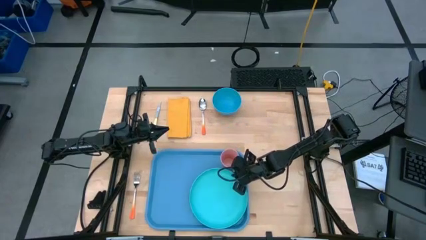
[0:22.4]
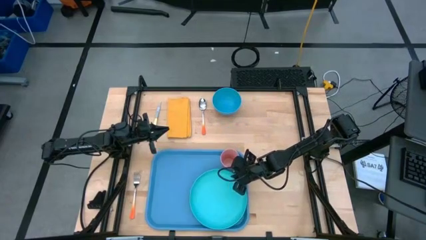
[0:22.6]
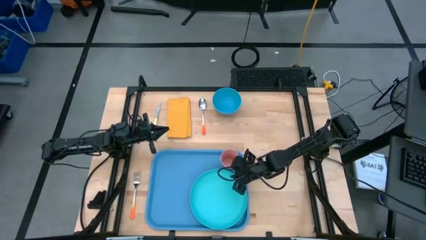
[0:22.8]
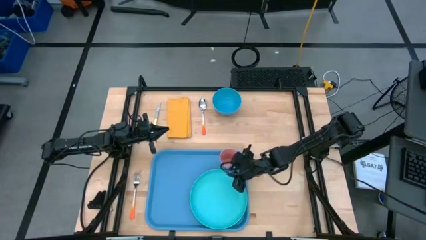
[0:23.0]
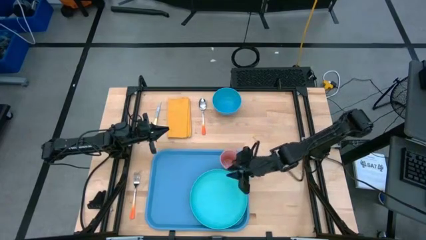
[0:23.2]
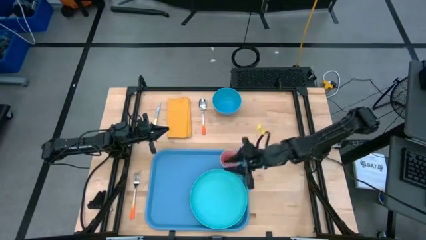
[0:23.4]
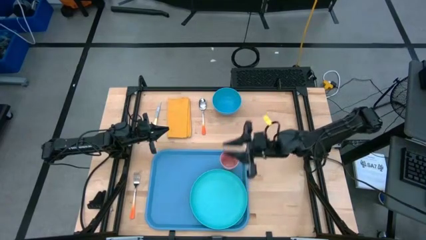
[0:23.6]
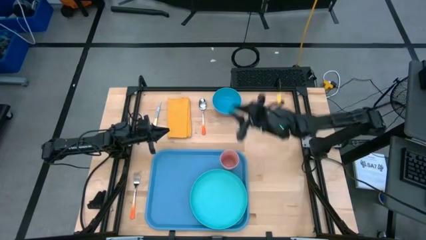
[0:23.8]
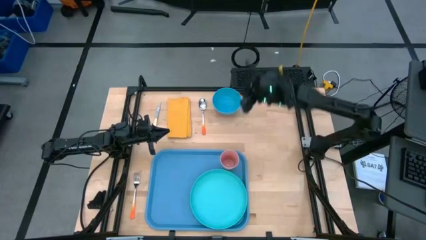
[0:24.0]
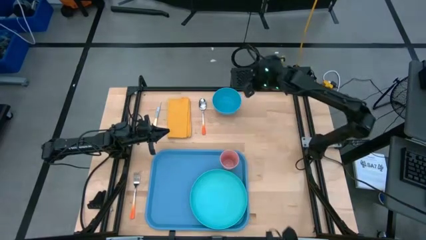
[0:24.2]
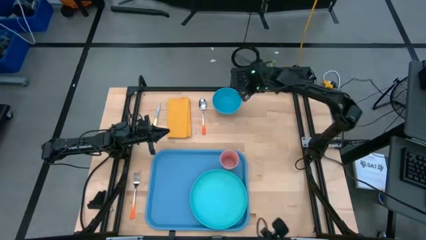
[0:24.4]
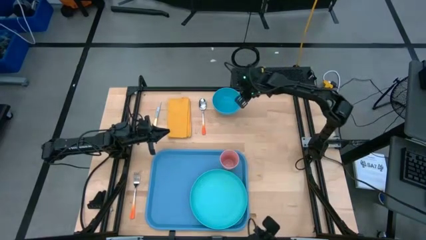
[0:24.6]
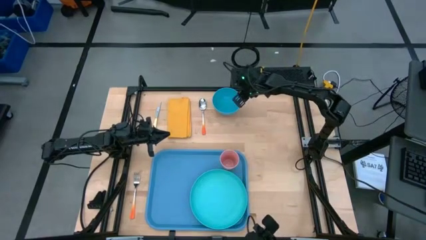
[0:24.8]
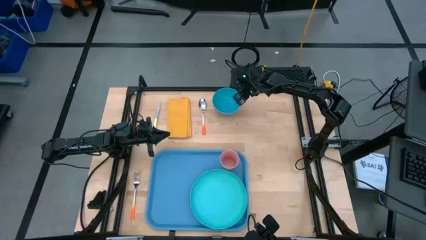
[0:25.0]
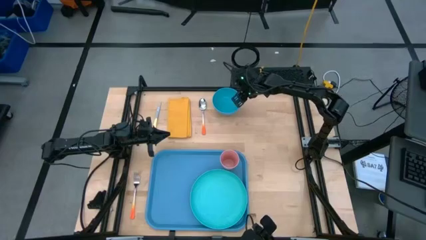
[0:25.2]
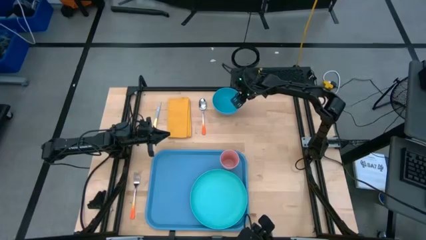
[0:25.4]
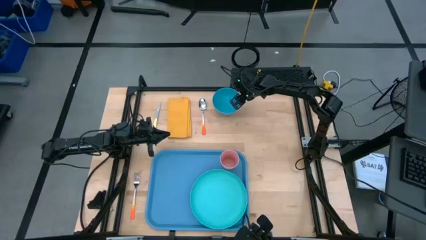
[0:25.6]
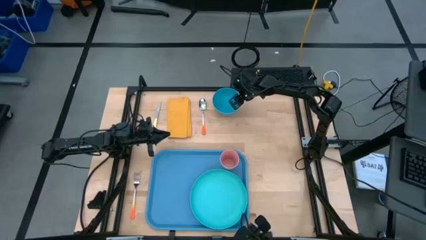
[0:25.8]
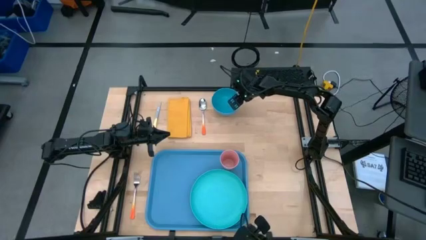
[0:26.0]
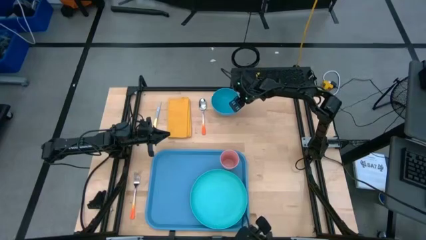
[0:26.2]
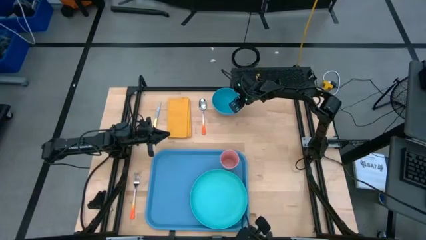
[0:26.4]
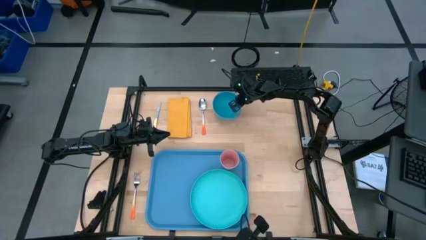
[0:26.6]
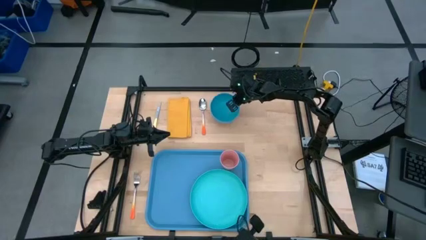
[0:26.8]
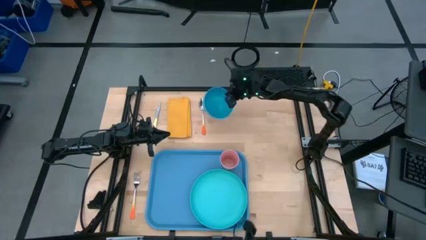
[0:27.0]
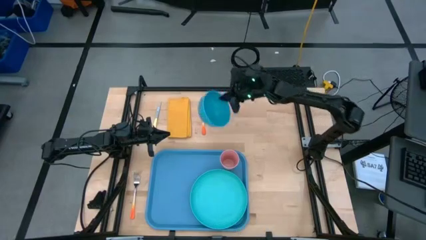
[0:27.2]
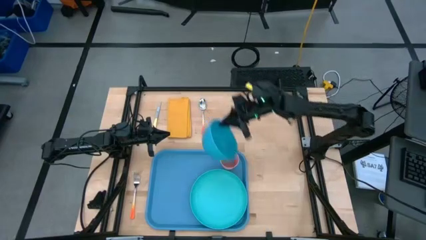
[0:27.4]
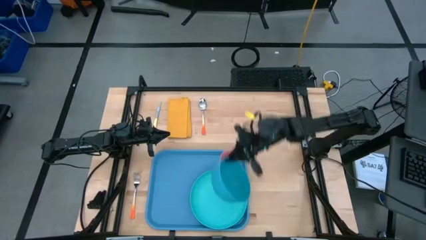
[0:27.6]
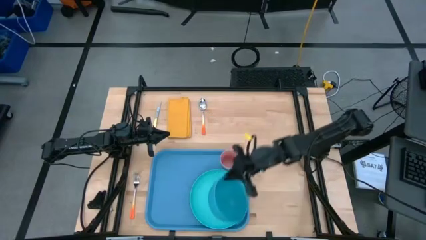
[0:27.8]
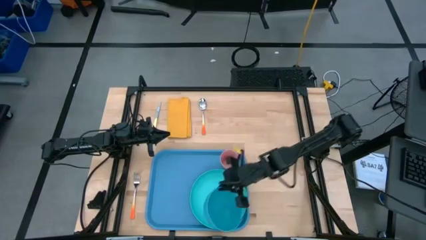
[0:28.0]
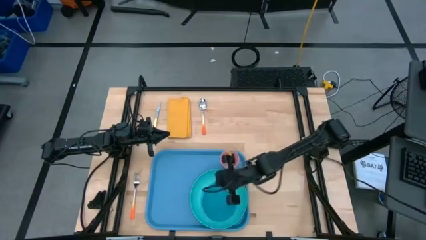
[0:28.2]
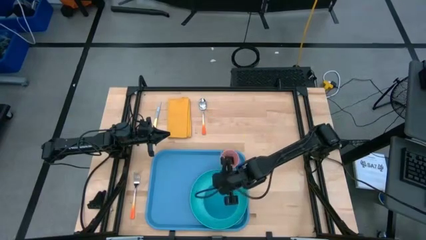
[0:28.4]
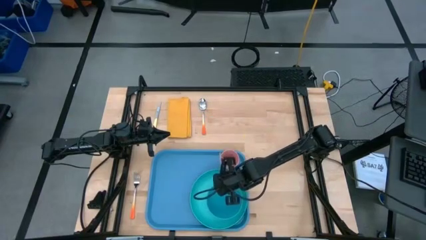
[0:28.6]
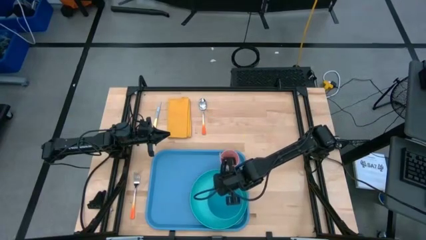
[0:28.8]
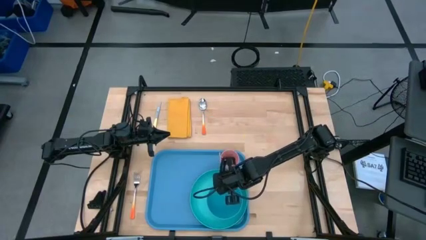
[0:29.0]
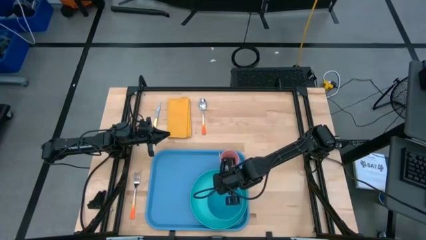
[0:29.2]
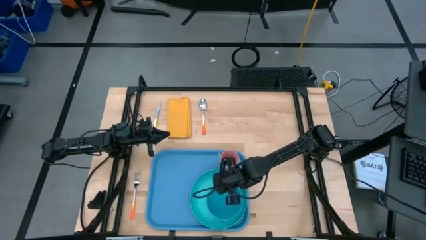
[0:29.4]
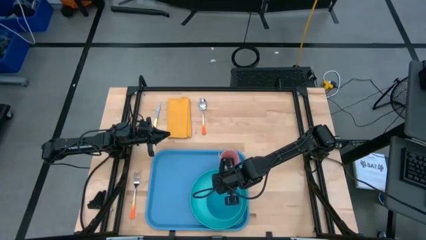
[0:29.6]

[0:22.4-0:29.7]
Task: Set up tray
Put the blue bowl on the blue plate

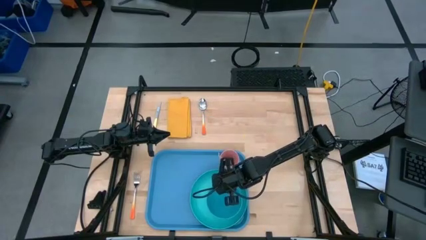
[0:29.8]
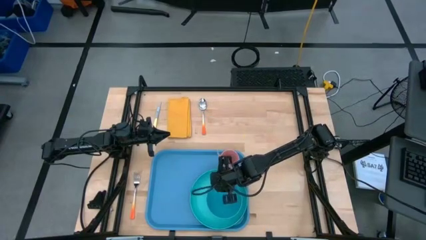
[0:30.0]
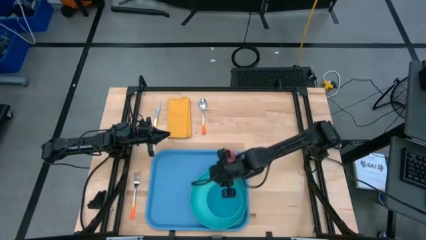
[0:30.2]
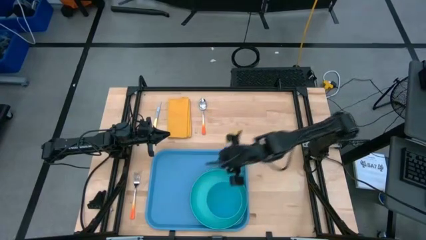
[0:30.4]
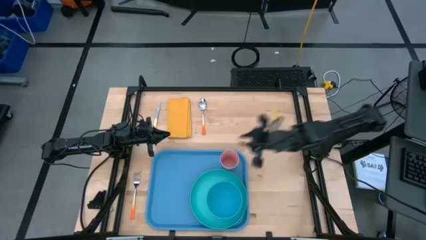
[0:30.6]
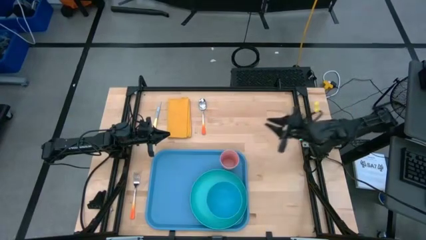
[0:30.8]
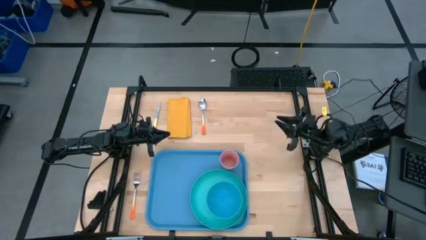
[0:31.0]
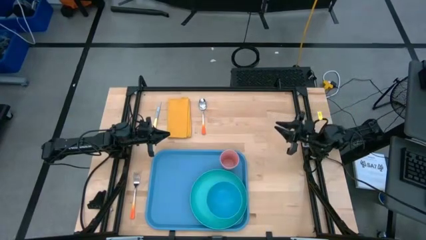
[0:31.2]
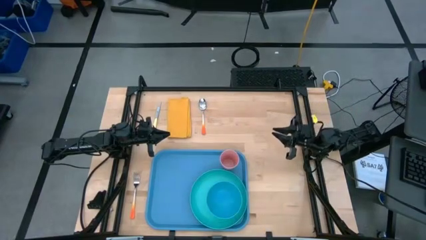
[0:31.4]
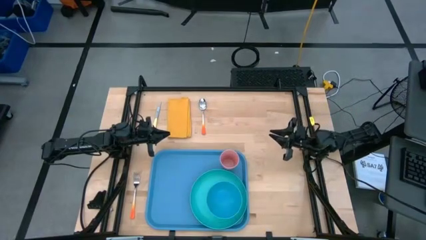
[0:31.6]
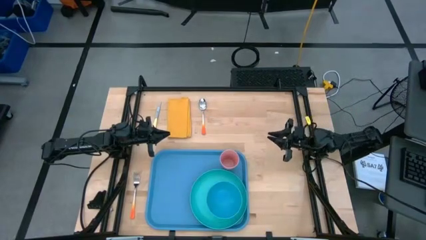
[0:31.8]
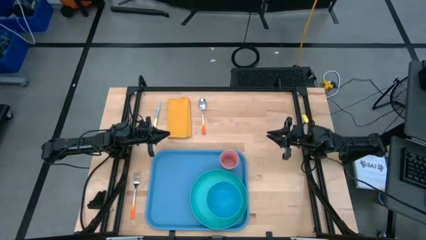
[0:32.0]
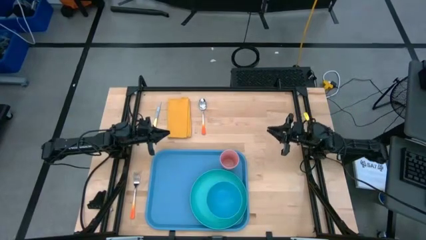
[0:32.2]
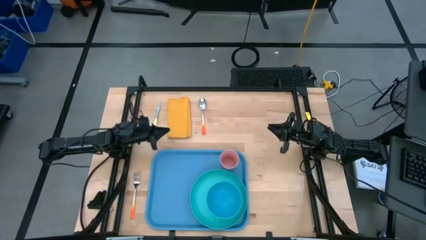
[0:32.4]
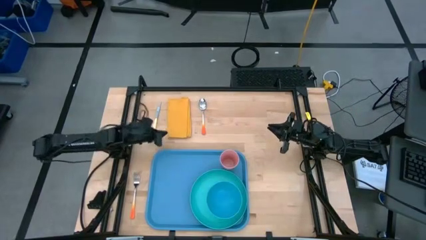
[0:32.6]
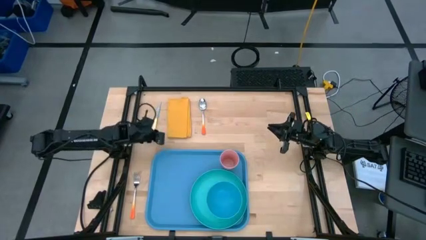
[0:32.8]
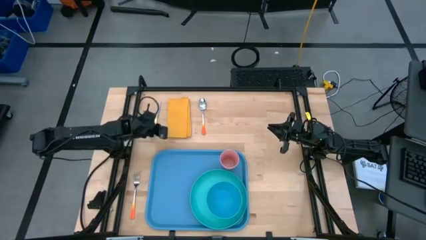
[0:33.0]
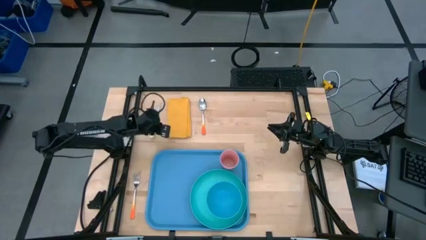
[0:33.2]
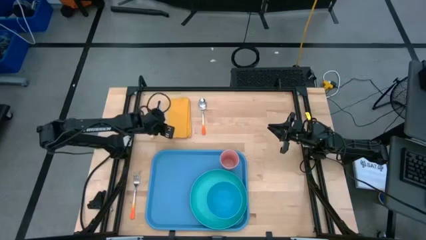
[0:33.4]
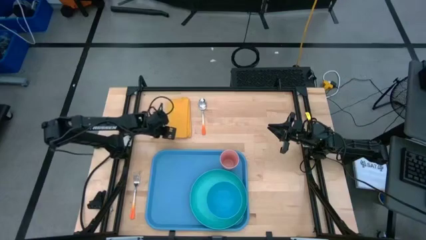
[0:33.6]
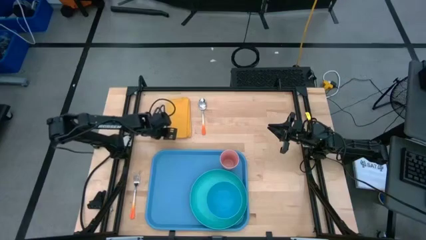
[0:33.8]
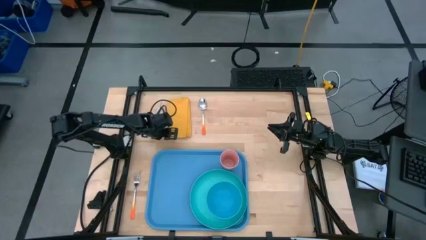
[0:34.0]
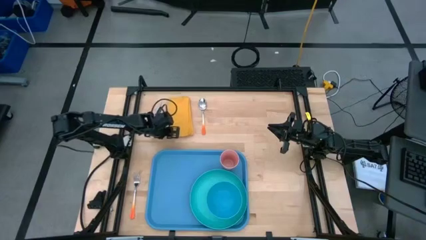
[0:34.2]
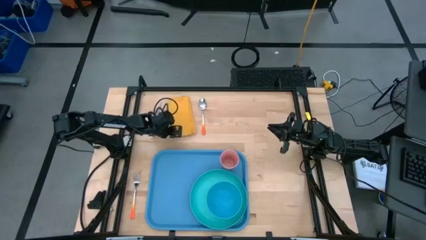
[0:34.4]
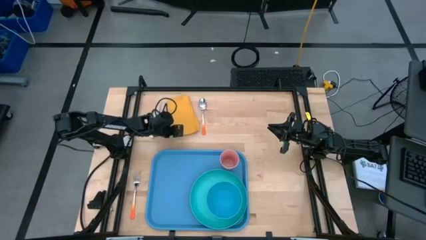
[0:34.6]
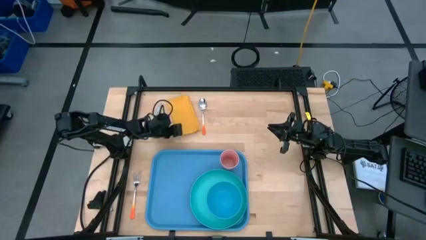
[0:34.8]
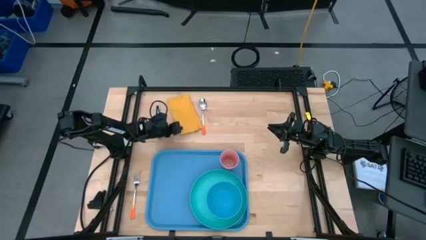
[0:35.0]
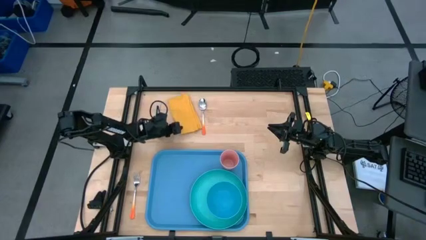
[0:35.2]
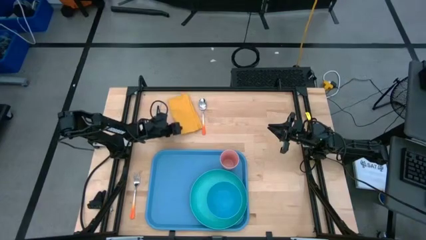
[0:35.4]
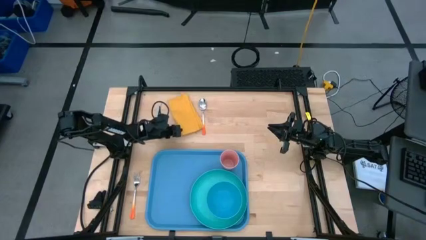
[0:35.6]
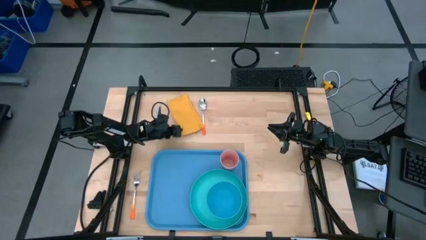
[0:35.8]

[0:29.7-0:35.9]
Put the yellow napkin to the left of the blue plate on the blue serving tray

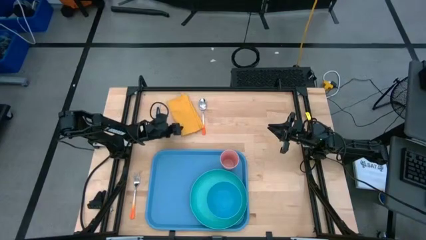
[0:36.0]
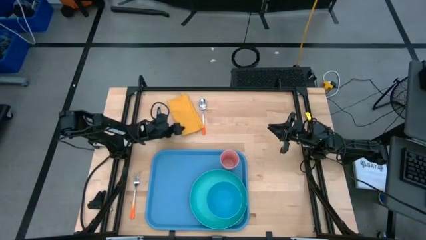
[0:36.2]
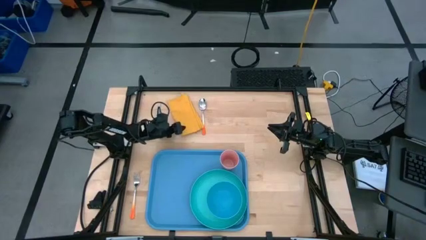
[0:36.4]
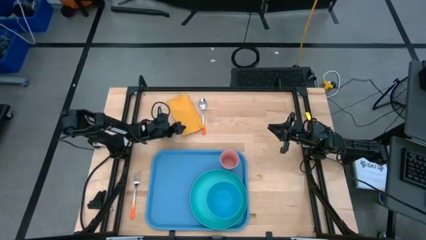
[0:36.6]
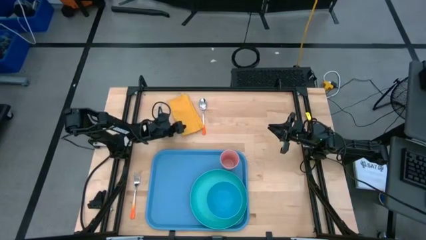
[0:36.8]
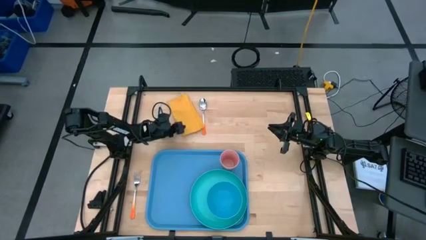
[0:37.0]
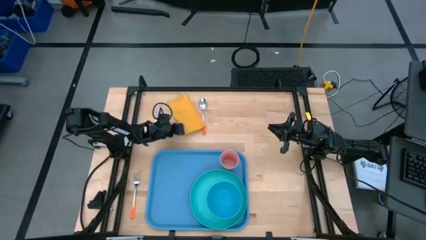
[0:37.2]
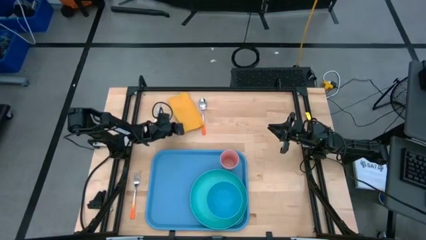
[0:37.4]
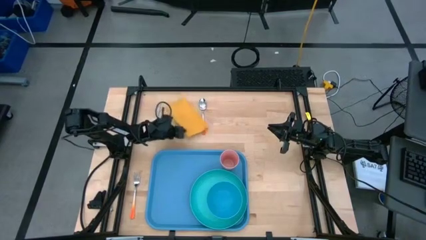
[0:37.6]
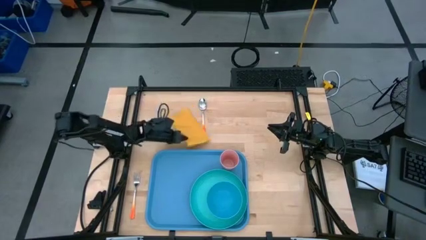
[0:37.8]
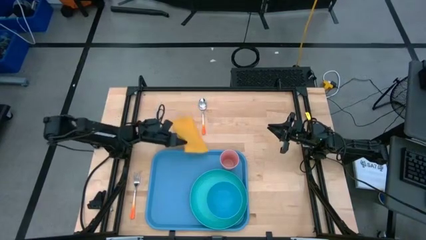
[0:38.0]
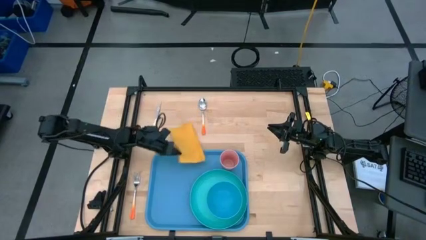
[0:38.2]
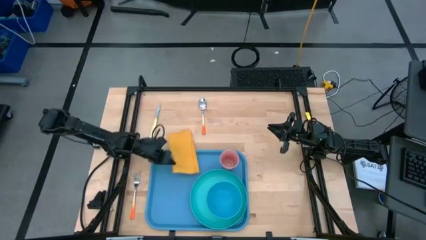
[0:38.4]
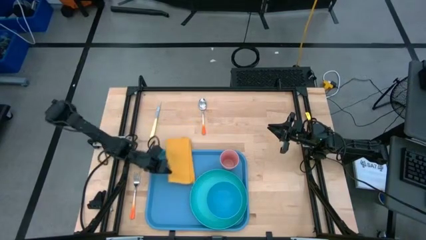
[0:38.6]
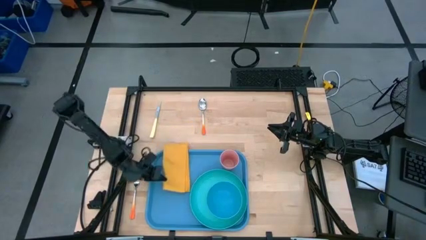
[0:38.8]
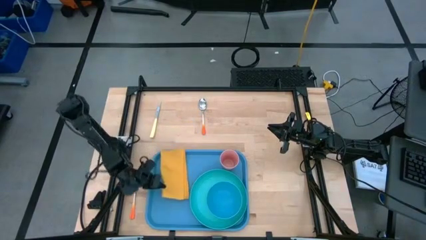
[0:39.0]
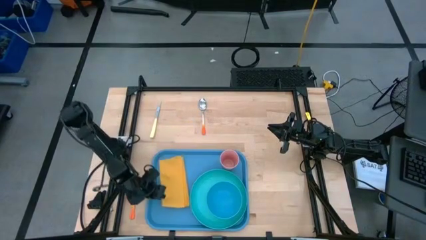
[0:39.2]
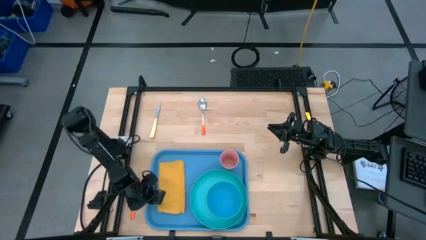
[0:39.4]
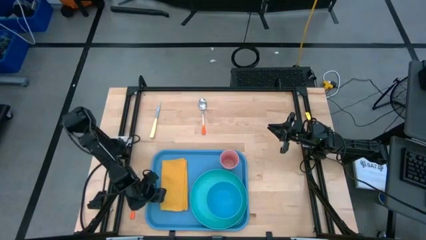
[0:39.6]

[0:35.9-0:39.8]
Put the yellow napkin to the left of the blue plate on the blue serving tray
